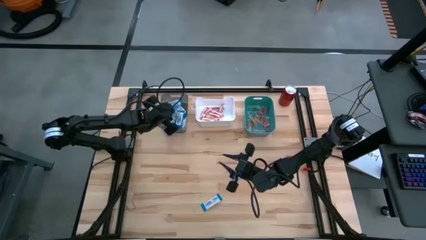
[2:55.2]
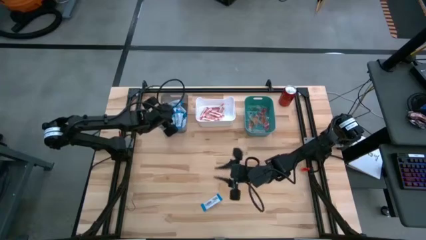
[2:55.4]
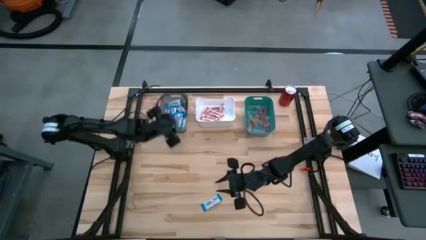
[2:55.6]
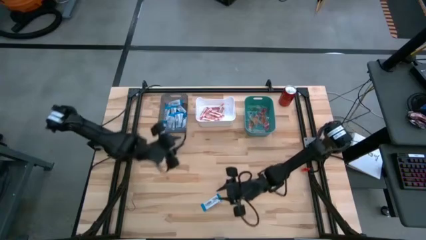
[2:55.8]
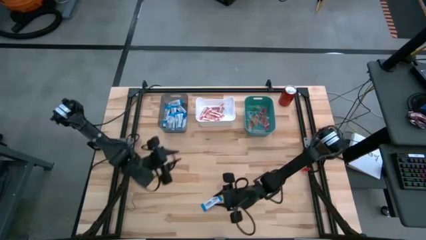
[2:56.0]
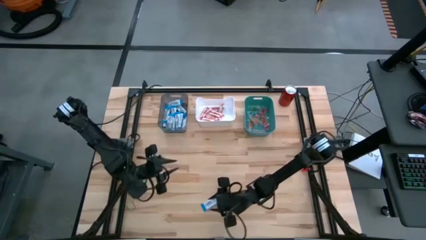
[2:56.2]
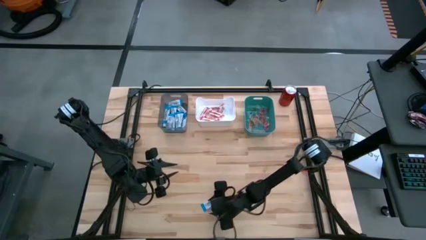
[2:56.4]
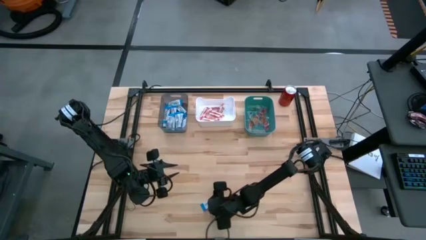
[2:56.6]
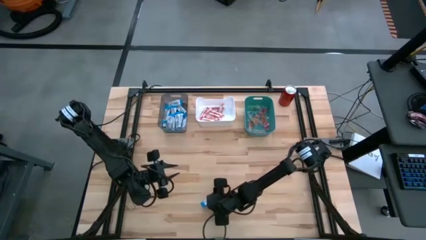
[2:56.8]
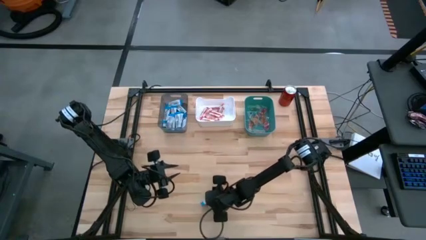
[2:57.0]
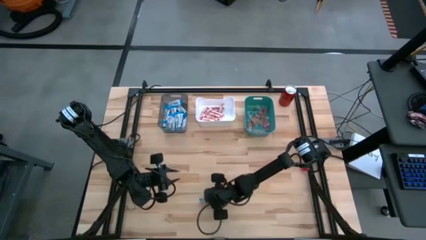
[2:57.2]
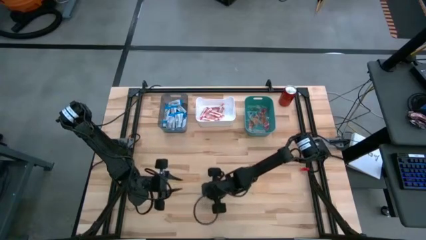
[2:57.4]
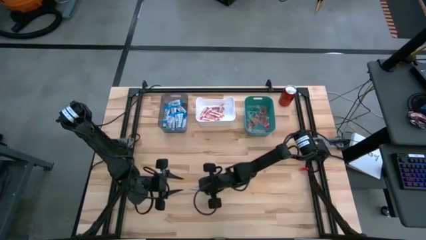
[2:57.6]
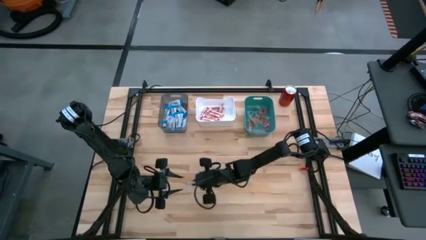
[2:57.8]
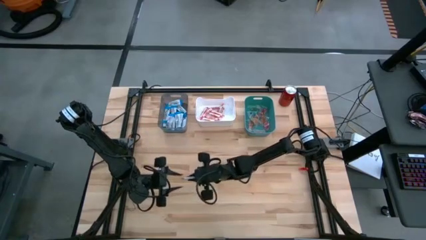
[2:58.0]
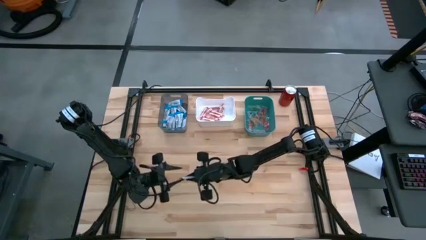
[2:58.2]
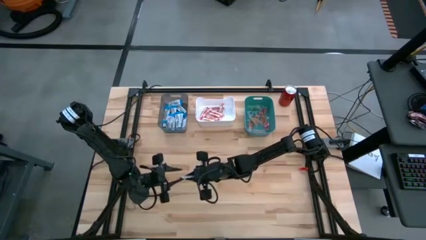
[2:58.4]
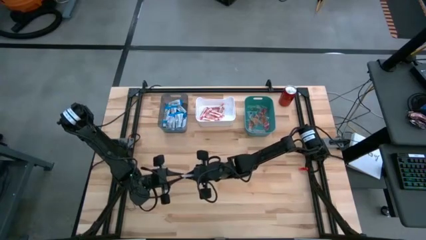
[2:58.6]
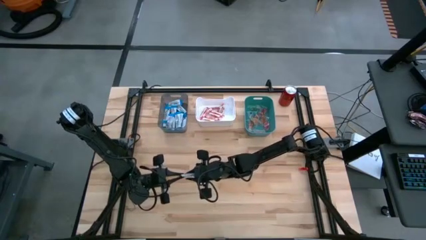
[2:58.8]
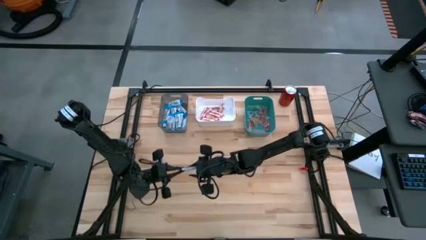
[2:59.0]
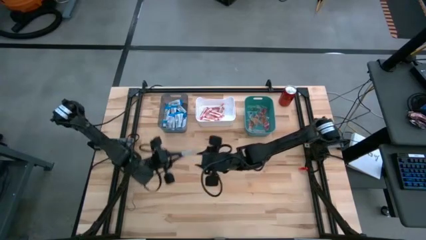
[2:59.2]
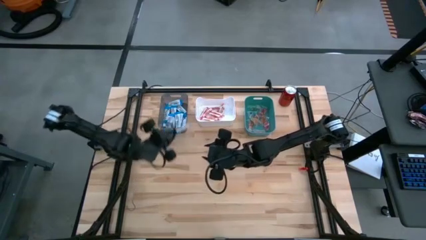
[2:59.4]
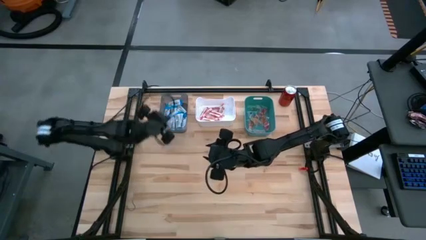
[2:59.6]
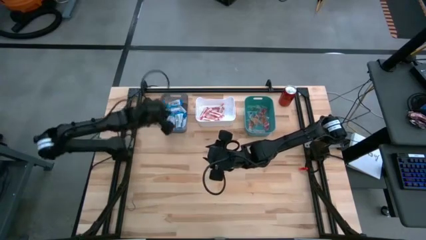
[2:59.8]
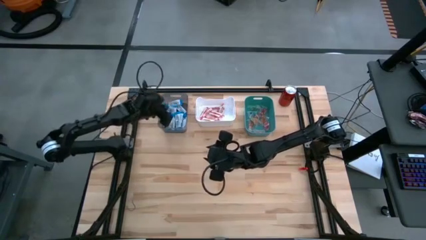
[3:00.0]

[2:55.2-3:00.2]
Task: Sort candy
Put the white chocolate into the gray bin

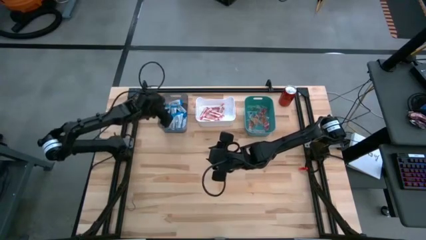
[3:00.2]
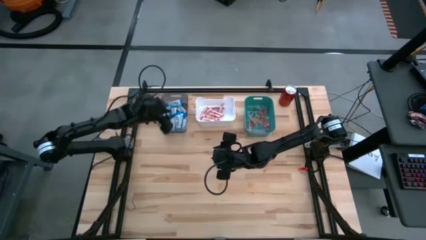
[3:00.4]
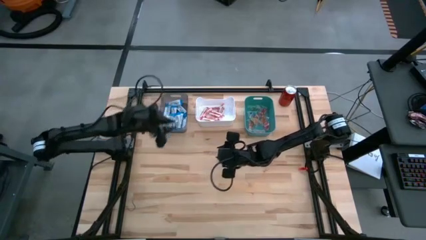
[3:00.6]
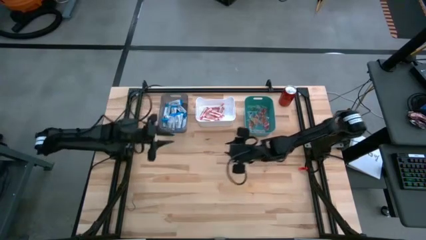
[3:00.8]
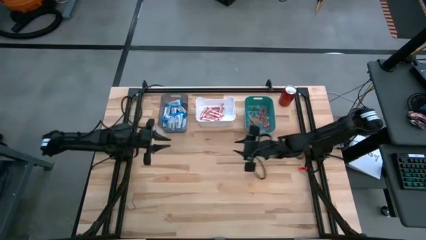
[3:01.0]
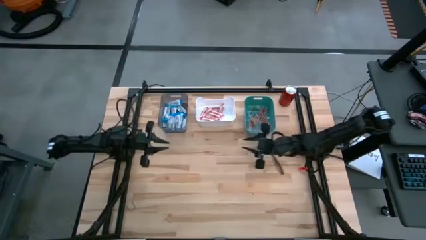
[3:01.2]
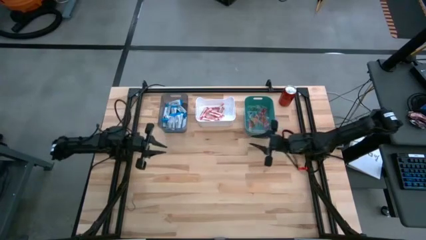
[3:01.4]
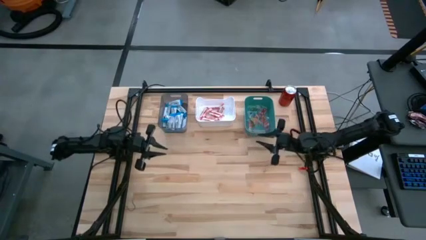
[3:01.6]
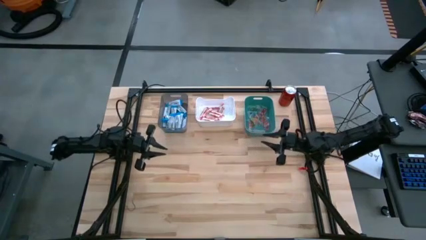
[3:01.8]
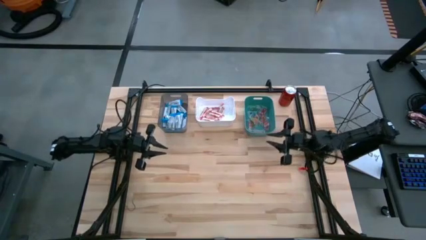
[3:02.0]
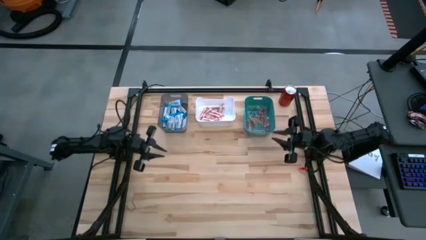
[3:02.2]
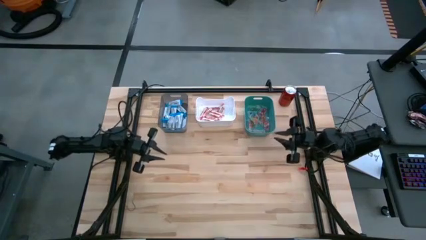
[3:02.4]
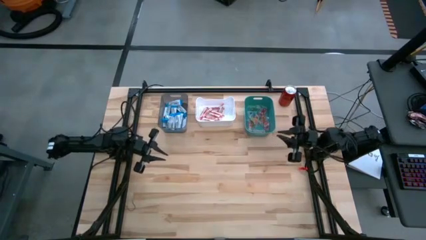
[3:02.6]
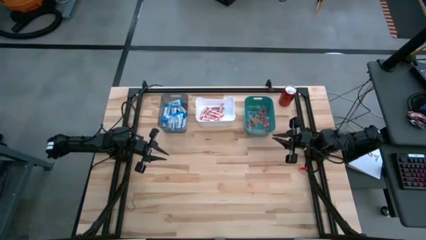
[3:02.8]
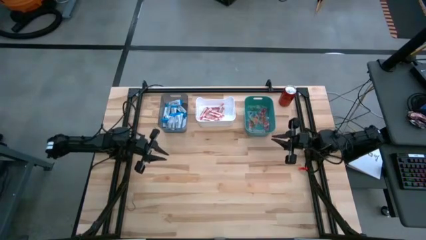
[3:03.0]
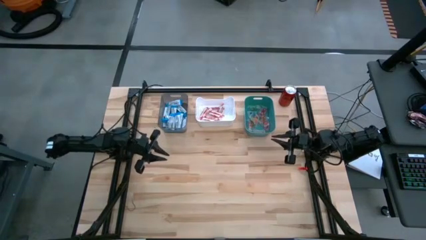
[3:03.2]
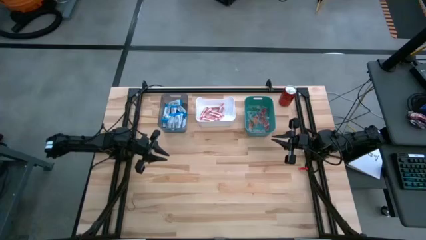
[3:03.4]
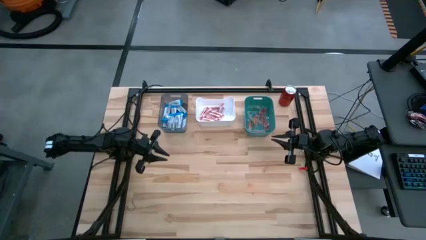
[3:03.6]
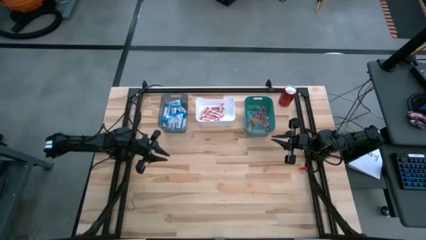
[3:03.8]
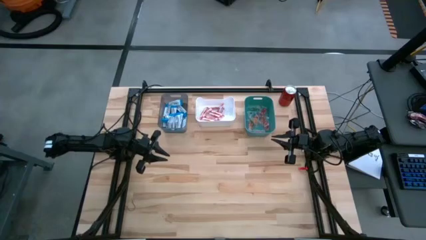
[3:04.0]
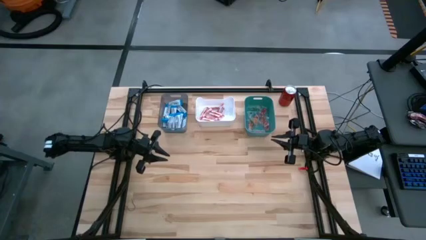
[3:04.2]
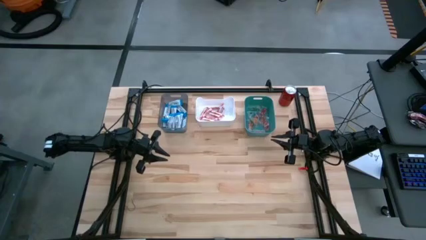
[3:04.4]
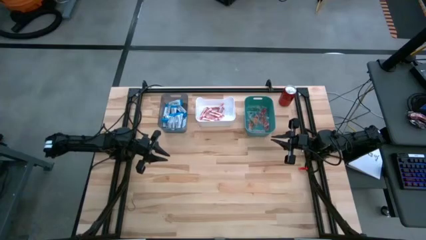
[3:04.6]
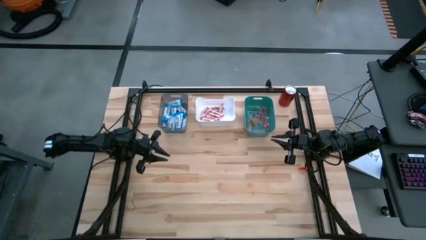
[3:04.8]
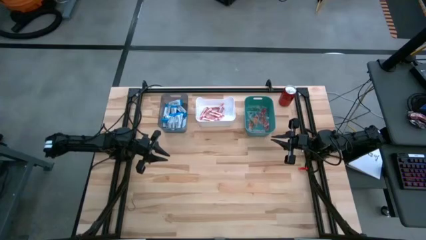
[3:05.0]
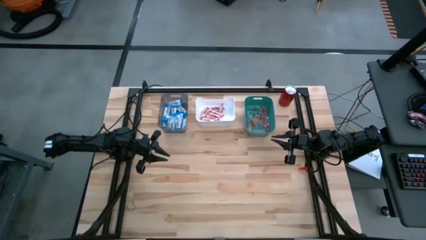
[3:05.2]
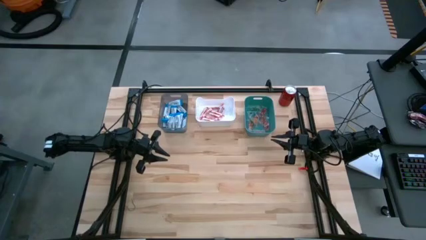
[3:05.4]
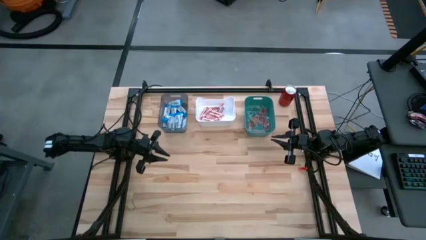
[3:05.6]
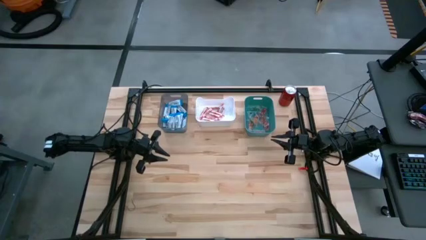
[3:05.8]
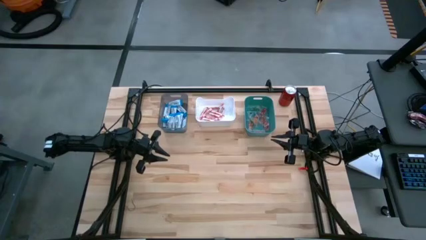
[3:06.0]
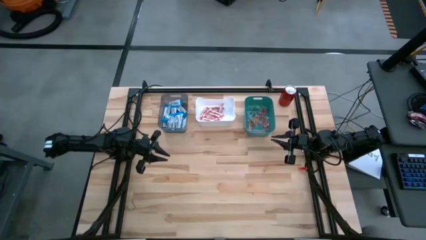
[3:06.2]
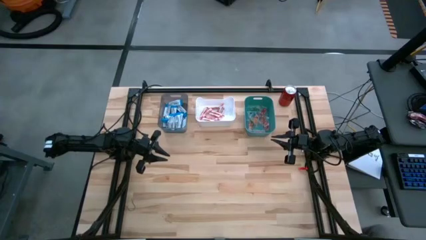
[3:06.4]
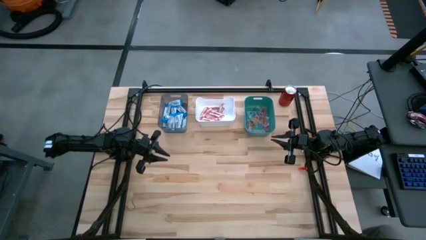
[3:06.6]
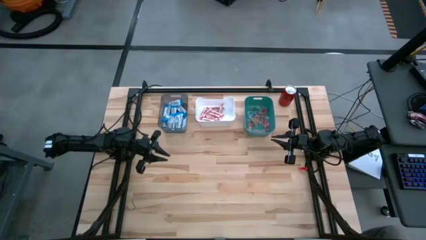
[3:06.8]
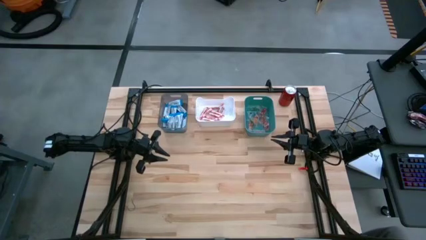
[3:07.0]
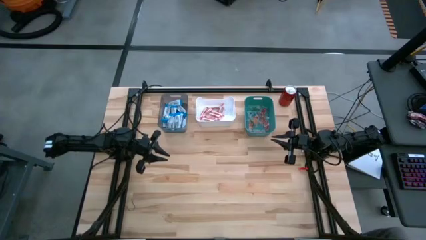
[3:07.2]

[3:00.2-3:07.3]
Return to Home Position

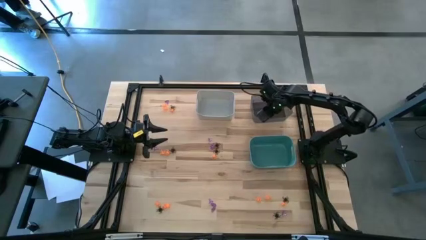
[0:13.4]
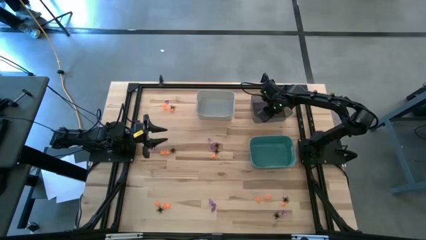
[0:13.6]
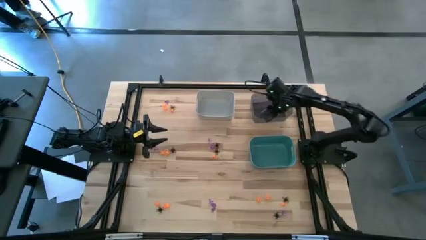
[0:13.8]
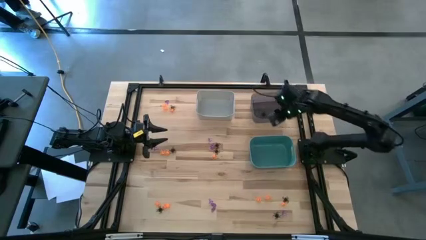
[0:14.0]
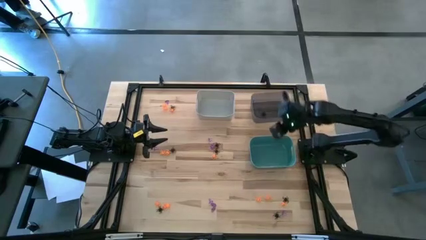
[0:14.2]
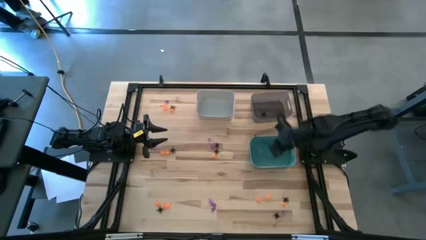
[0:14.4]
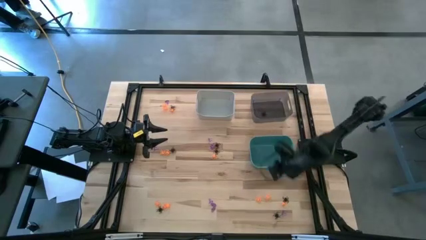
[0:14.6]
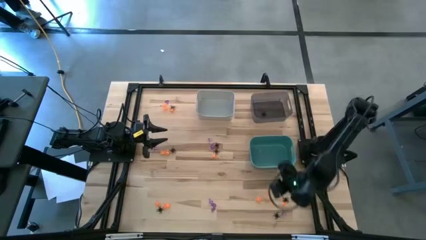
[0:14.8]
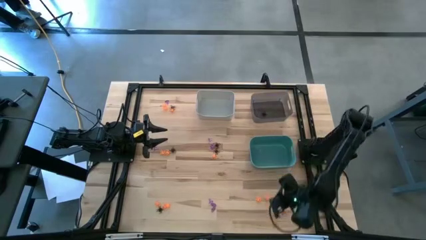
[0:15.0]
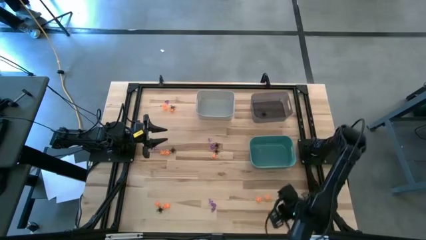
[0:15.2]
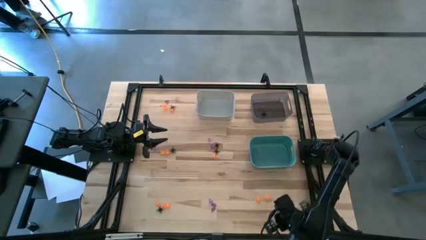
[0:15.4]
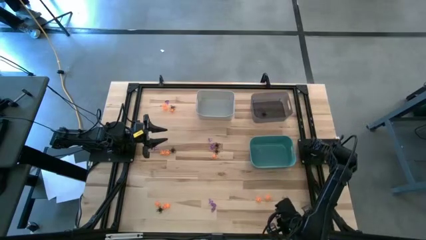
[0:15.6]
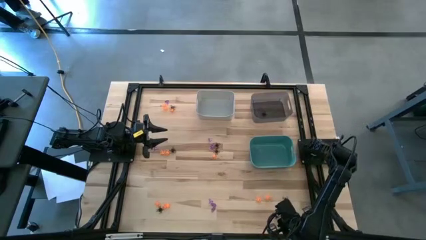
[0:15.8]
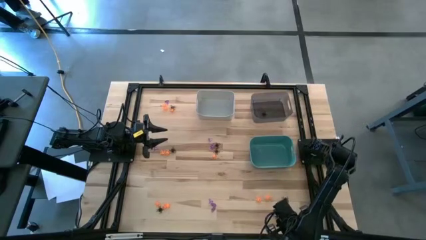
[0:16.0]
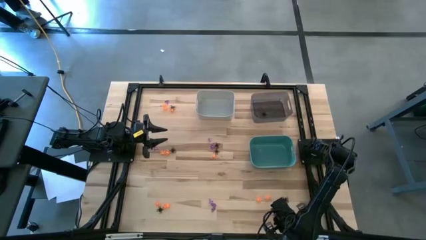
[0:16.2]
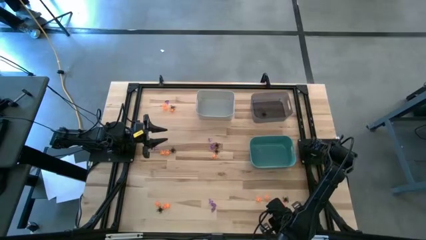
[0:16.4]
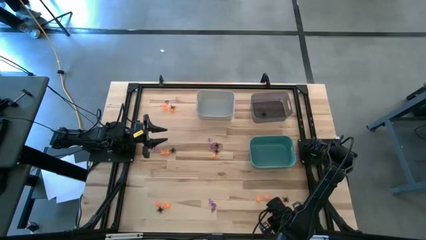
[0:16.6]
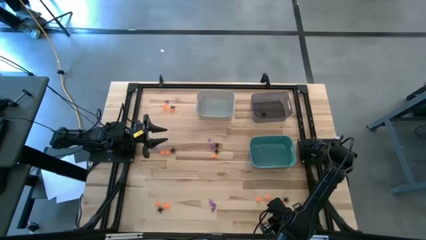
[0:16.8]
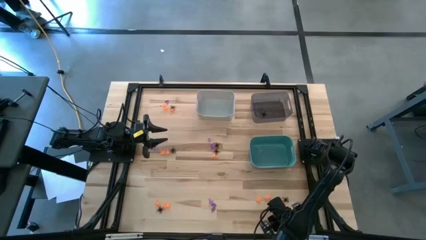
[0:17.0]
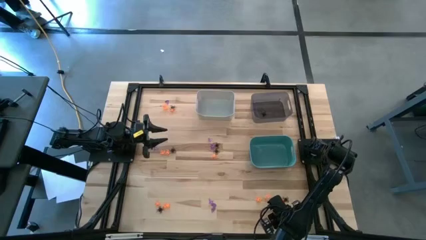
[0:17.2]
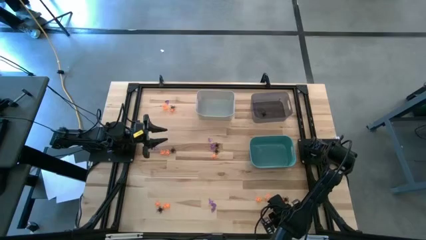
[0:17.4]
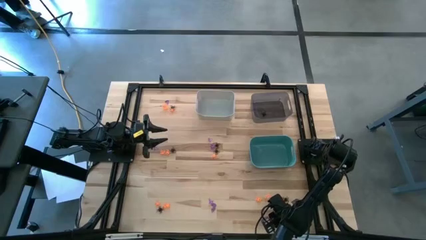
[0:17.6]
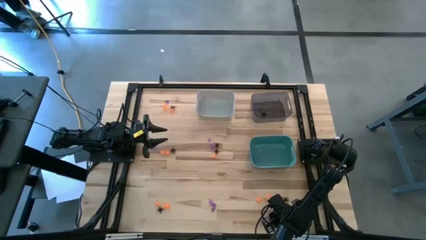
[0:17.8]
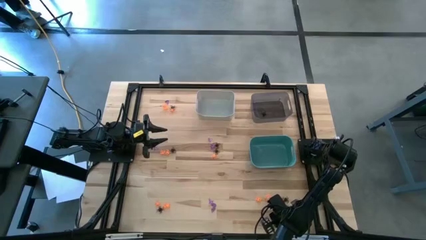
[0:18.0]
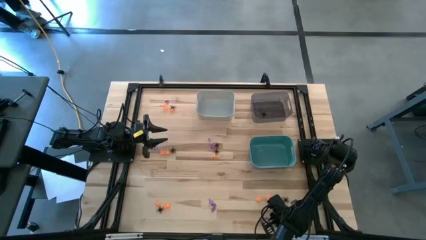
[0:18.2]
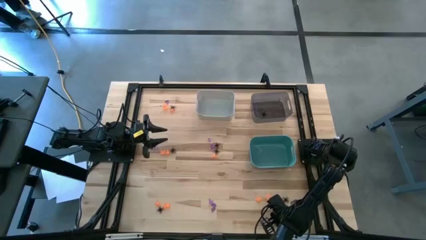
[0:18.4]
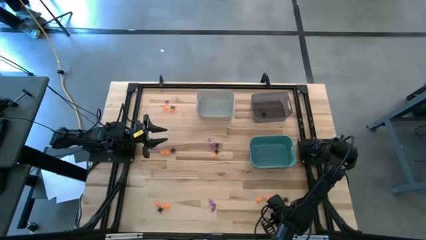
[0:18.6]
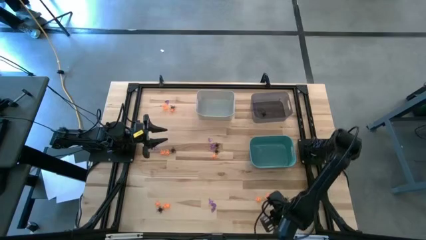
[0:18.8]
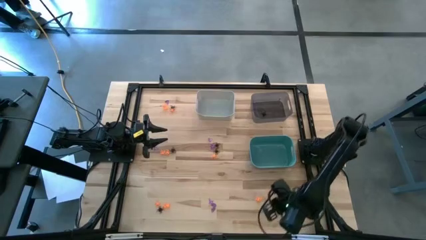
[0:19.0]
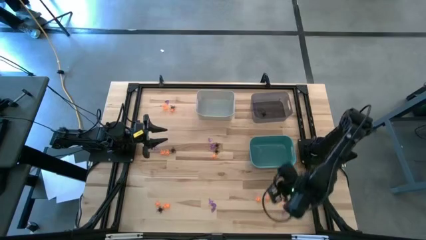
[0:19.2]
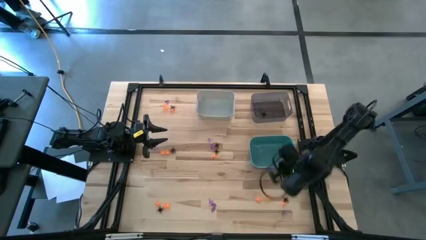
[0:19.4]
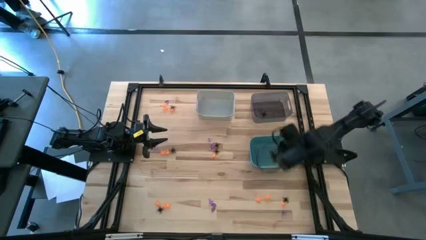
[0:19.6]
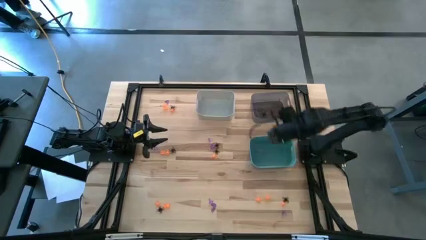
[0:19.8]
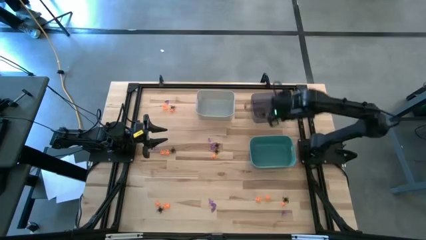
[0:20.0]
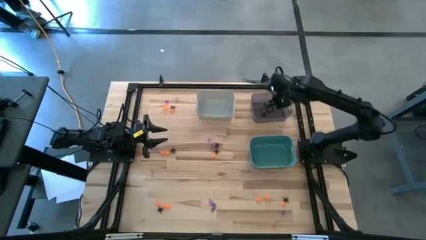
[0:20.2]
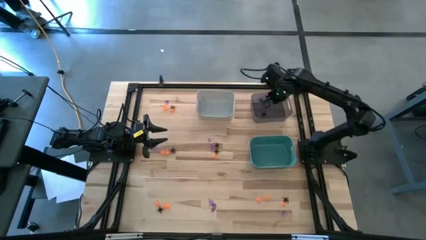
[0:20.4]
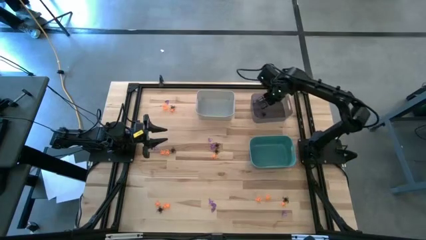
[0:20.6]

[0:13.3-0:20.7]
Task: Sort Halloween decoration
Put the black spider toy into the black bin
